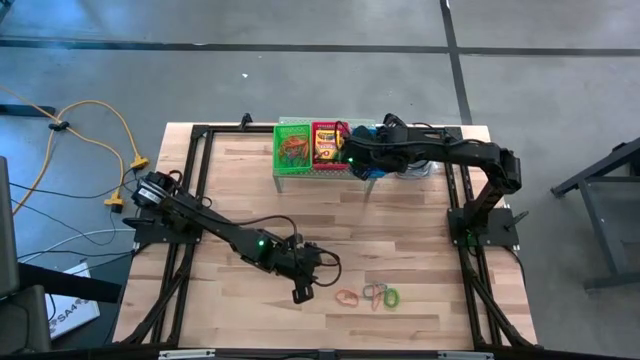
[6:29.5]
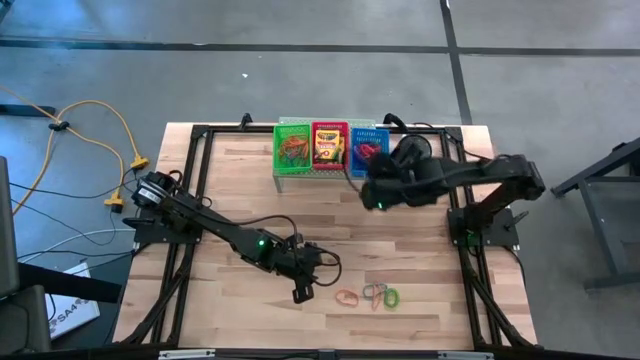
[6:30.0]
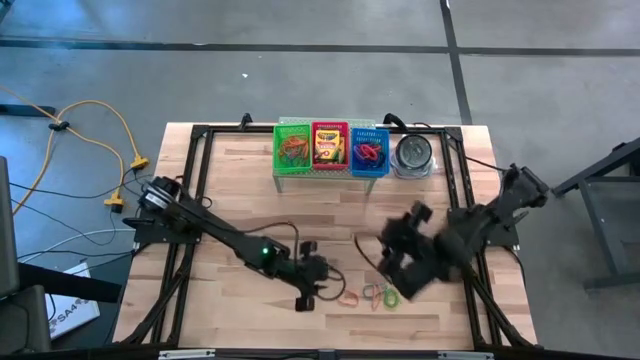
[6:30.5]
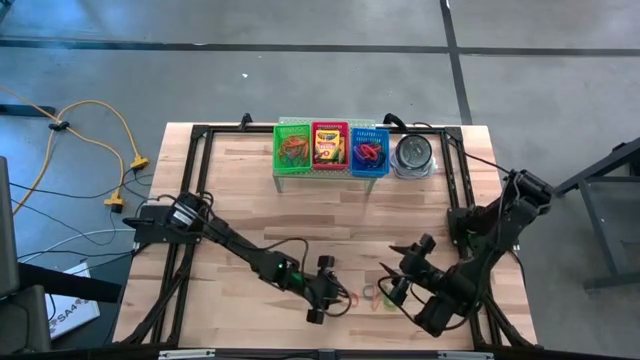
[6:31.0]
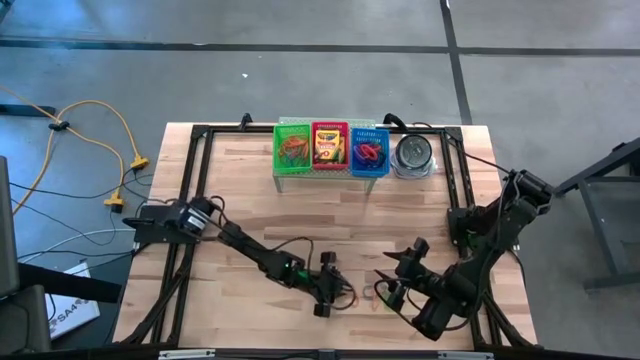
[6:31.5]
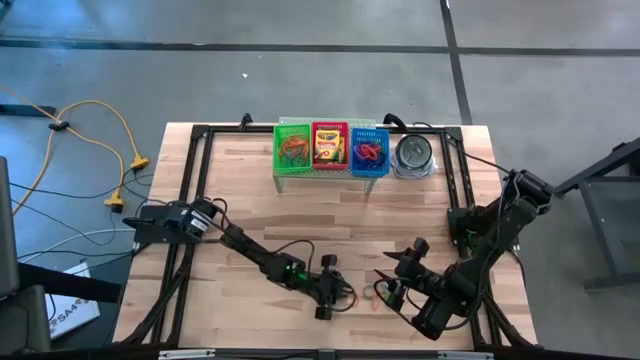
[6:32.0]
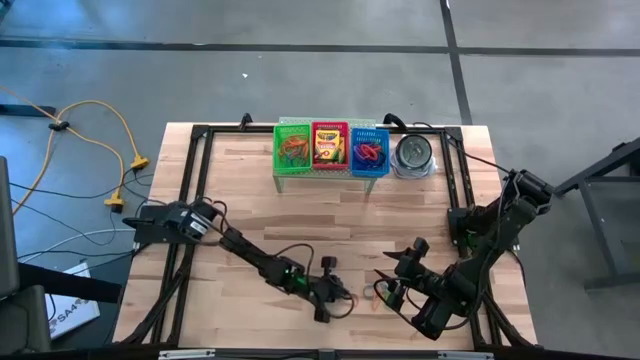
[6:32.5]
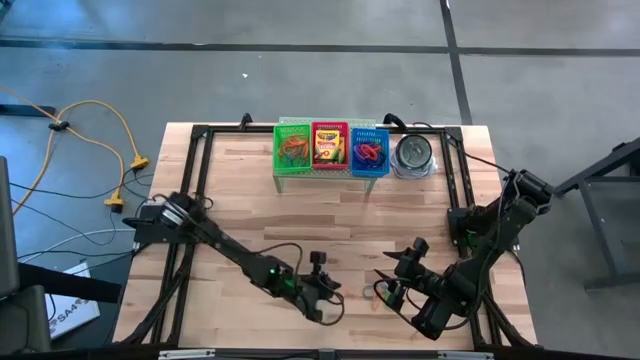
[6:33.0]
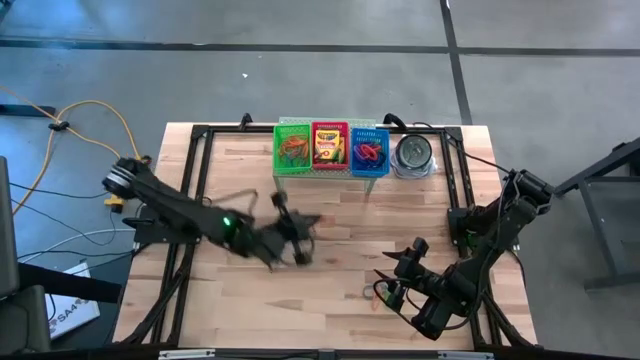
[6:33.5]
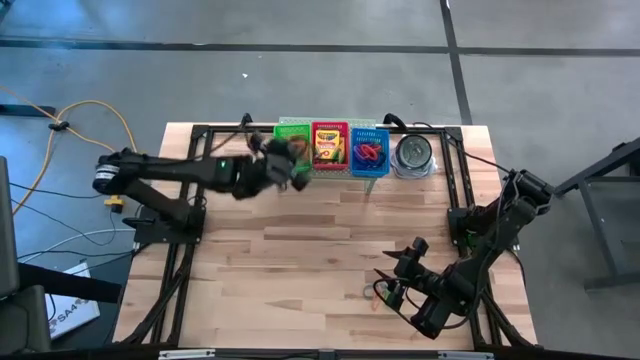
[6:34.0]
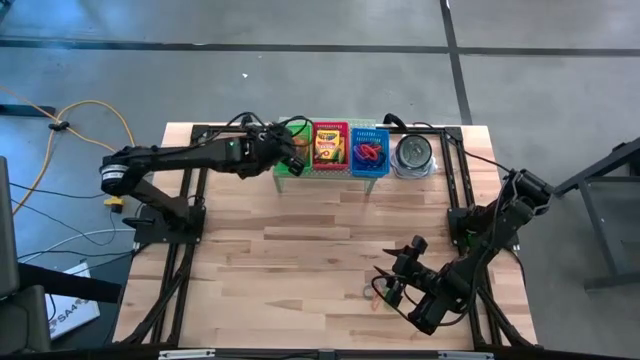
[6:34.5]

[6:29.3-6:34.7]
Task: Pick & Place Office Desk Supplies
Put the left orange rubber band into the green bin on the shelf

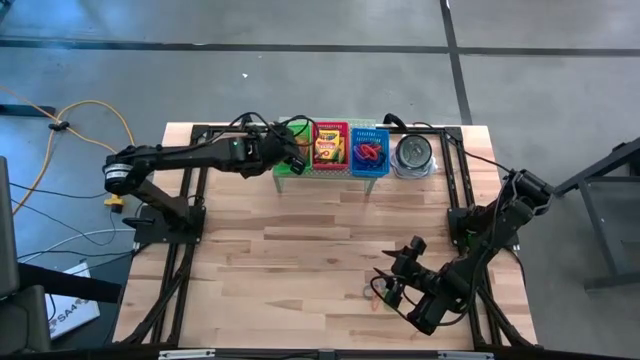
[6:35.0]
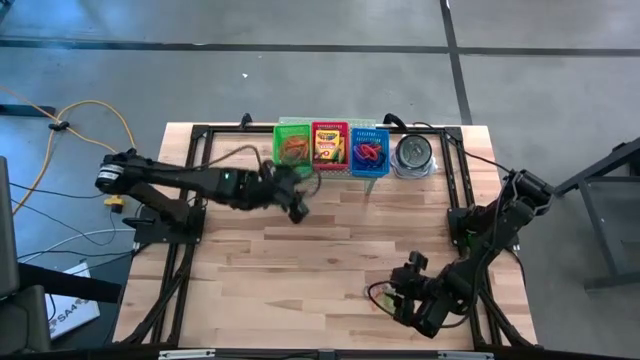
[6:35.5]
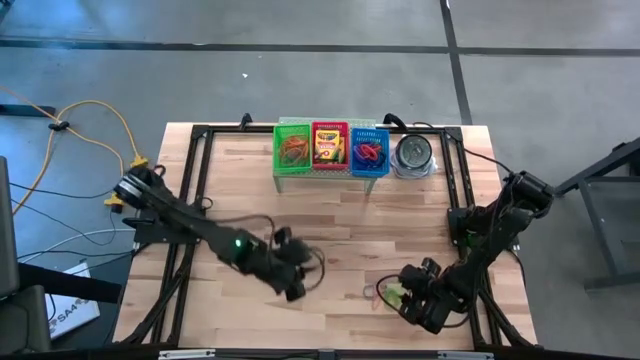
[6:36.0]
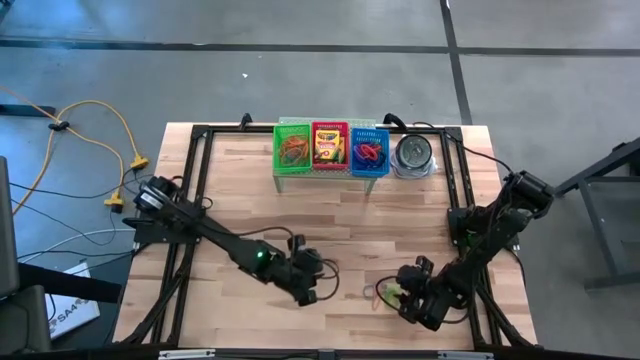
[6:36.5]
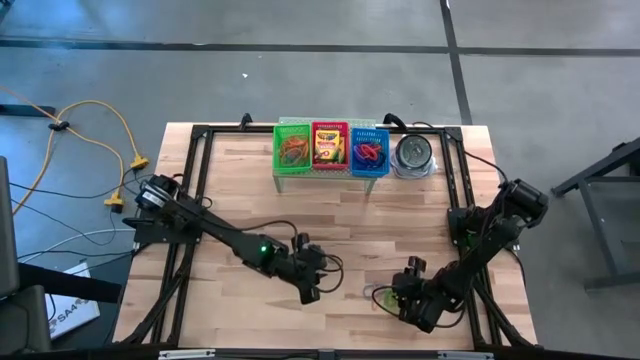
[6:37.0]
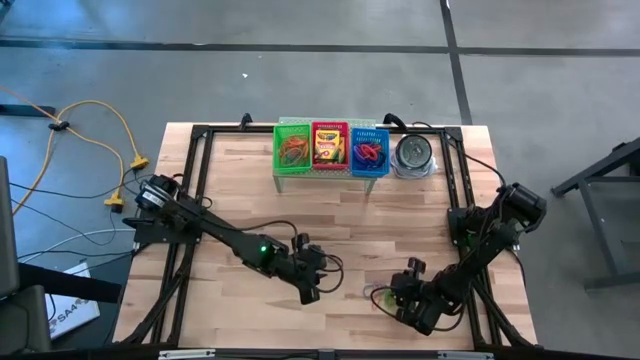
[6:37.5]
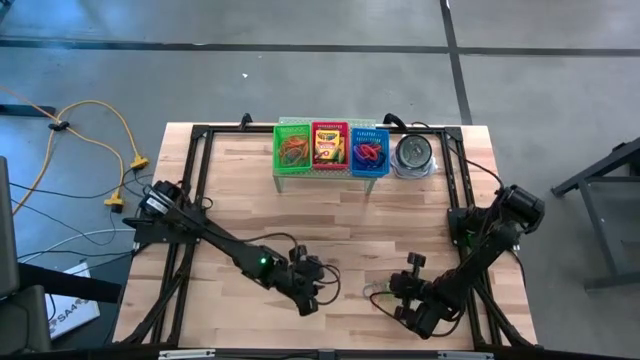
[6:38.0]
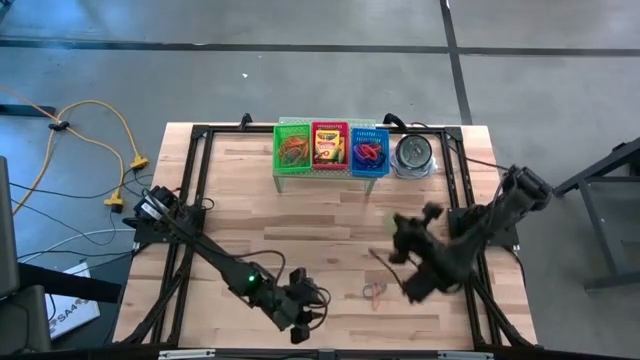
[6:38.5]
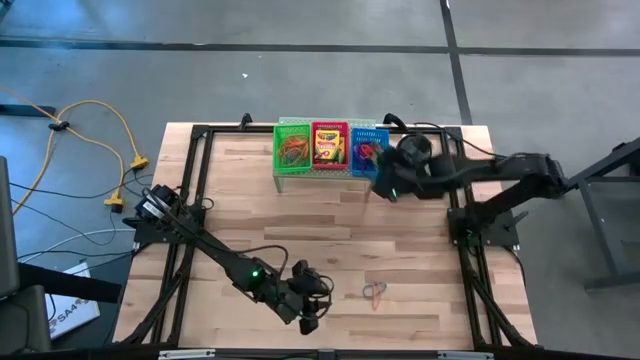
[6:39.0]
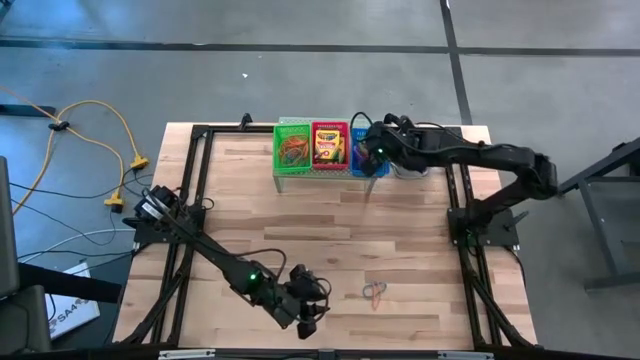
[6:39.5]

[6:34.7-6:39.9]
Put the green spring keychain into the blue bin on the shelf

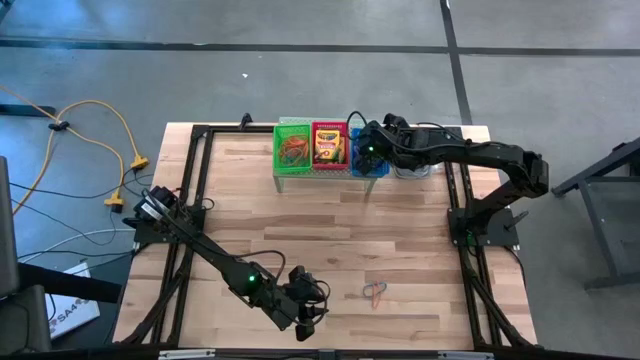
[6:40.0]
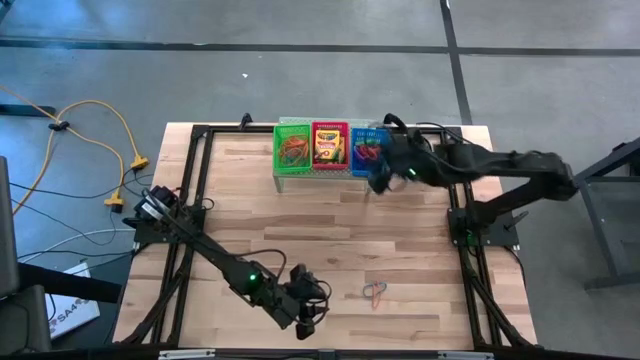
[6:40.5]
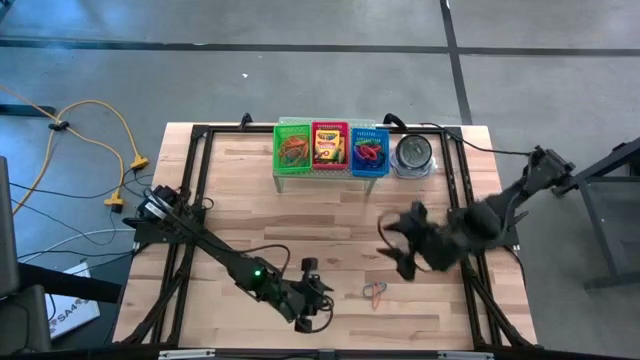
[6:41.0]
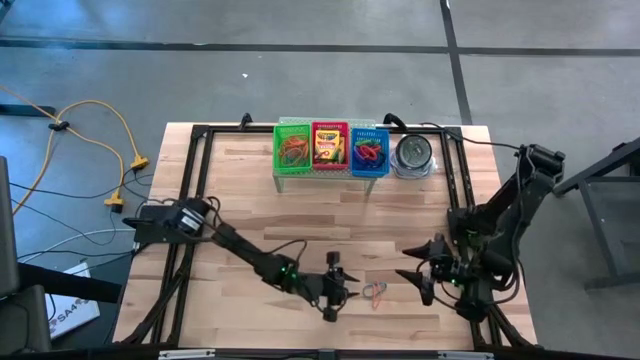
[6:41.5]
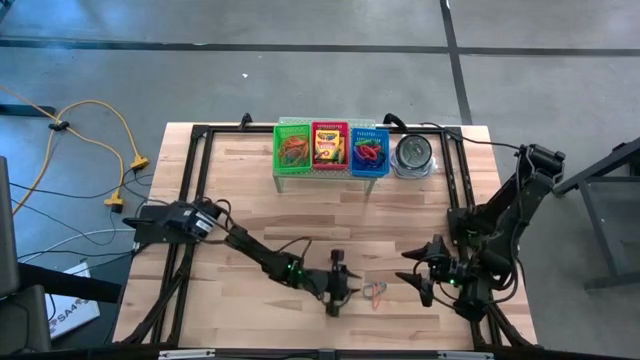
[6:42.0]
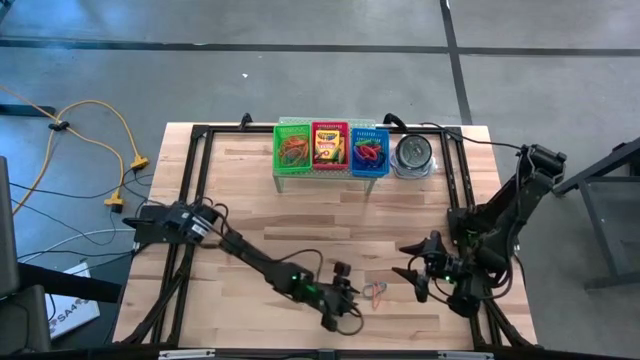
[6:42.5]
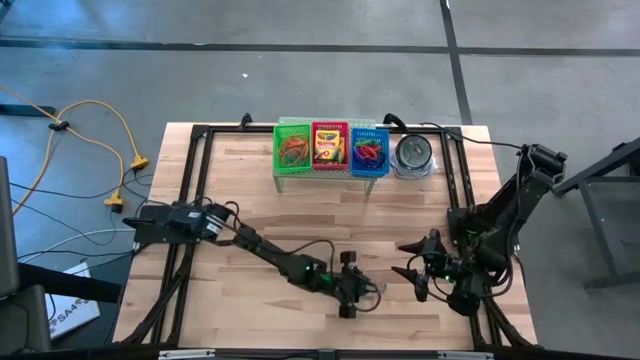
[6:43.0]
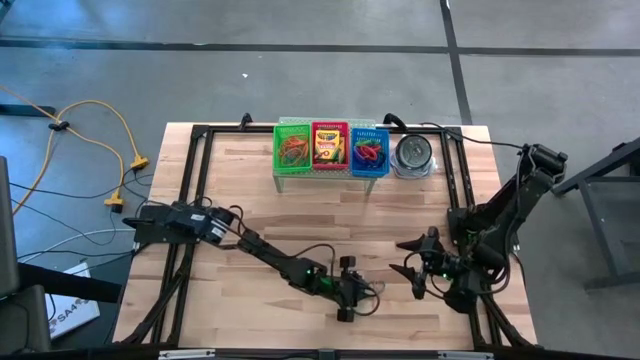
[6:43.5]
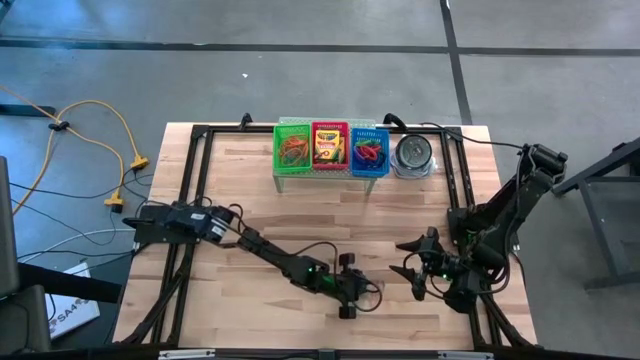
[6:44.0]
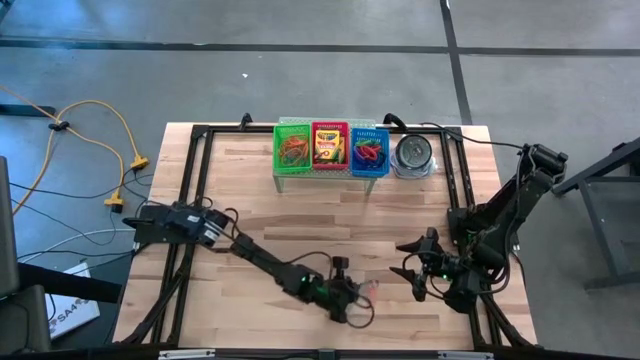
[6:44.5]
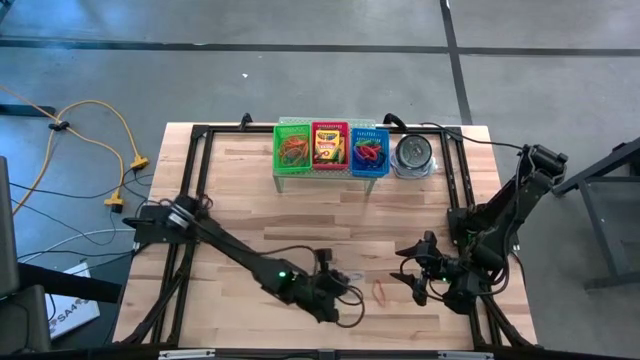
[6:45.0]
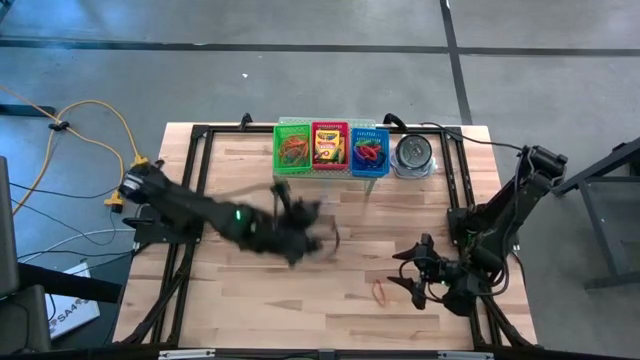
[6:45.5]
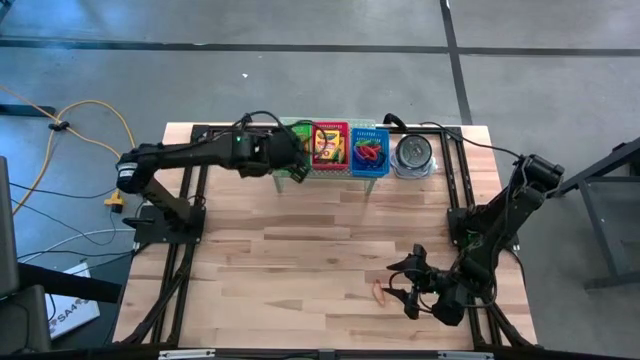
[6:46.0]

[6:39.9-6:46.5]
Put the blue rubber band into the green bin on the shelf
